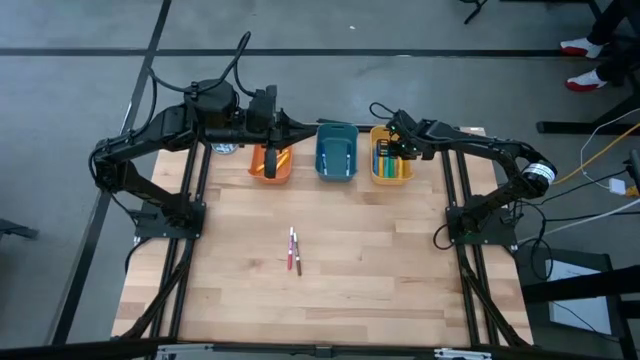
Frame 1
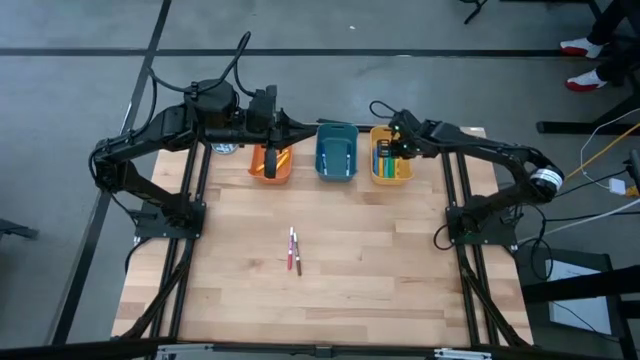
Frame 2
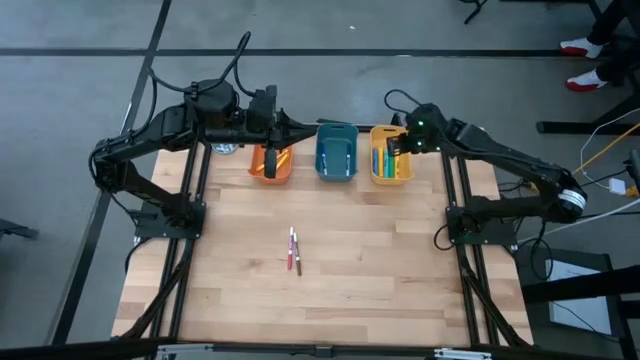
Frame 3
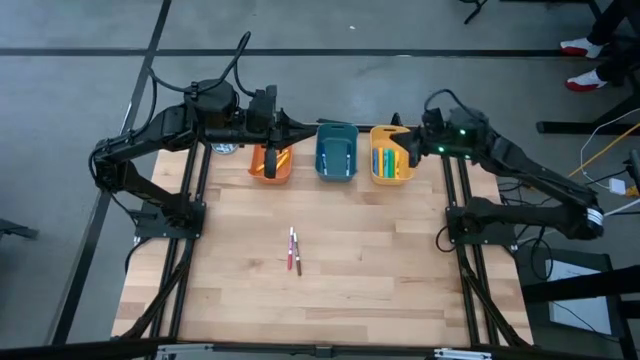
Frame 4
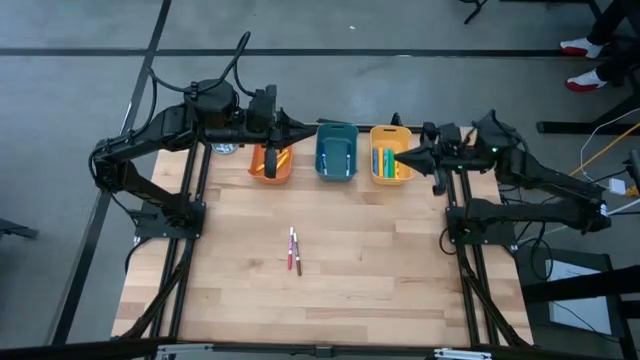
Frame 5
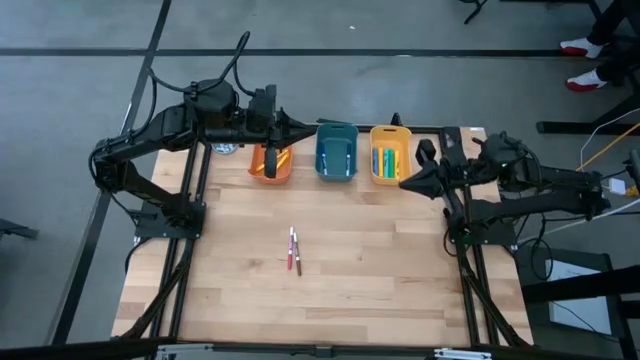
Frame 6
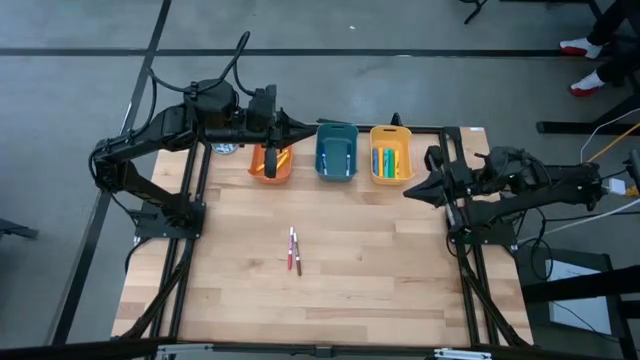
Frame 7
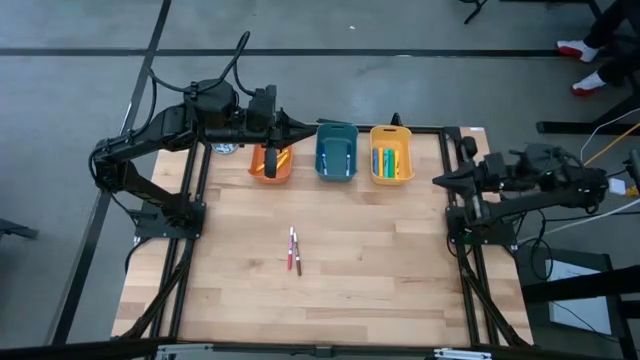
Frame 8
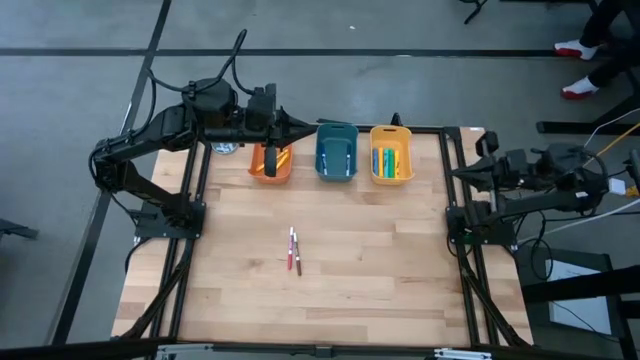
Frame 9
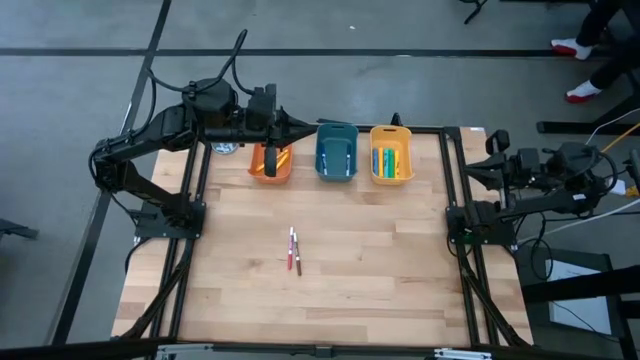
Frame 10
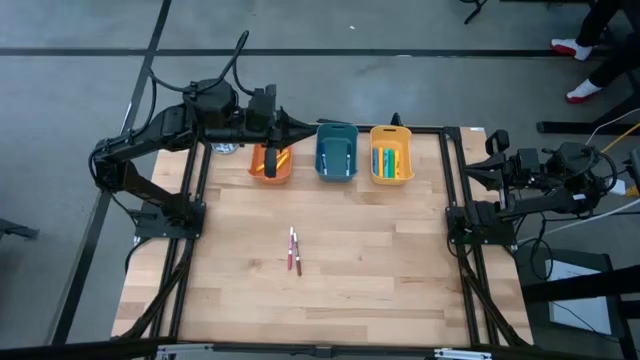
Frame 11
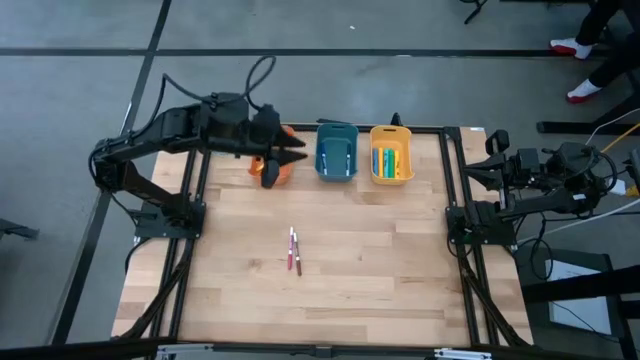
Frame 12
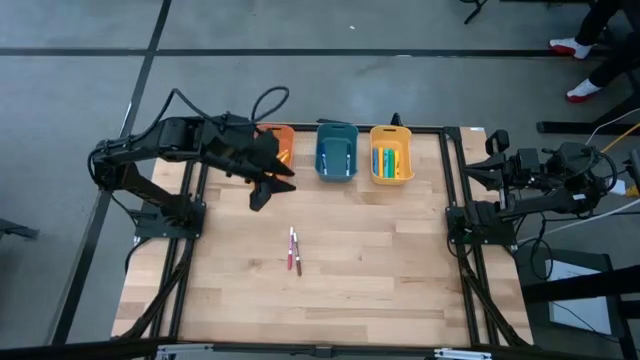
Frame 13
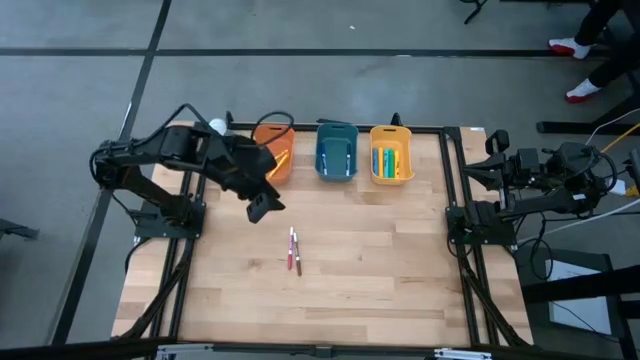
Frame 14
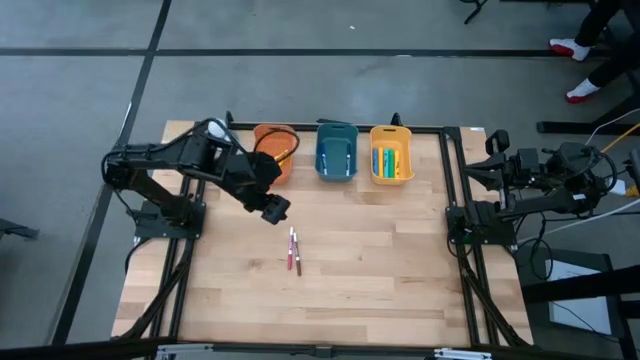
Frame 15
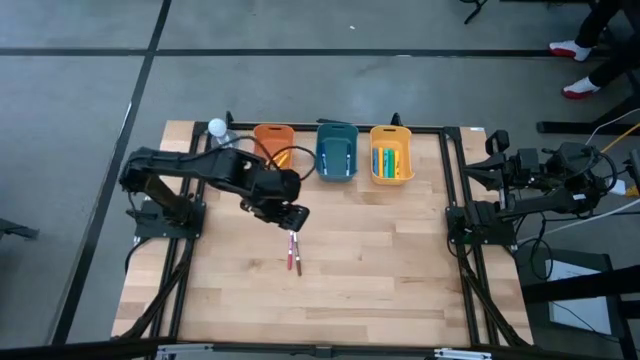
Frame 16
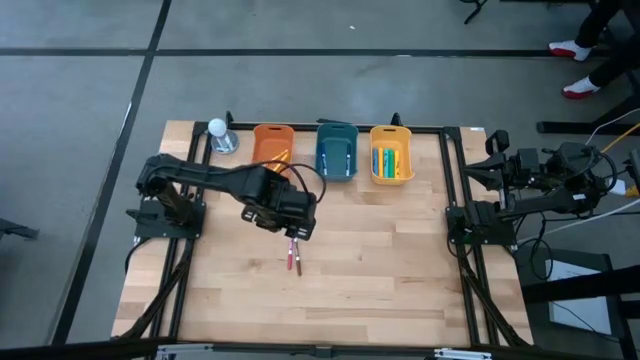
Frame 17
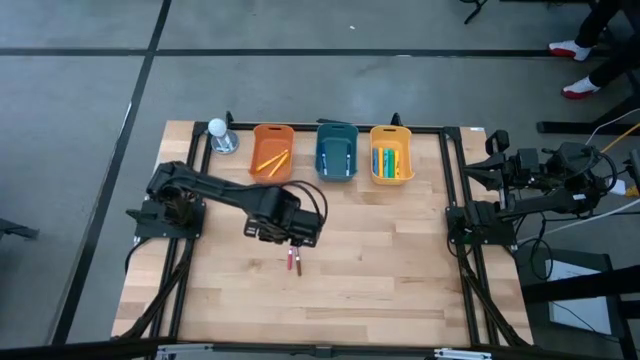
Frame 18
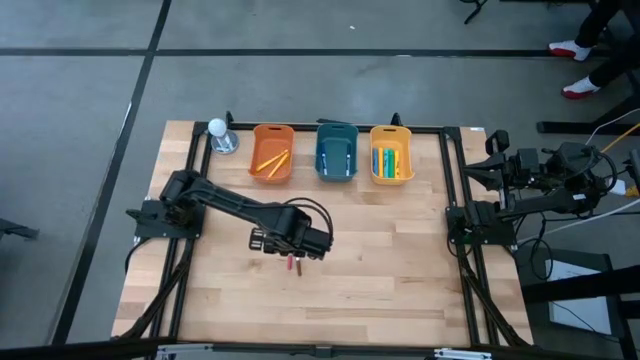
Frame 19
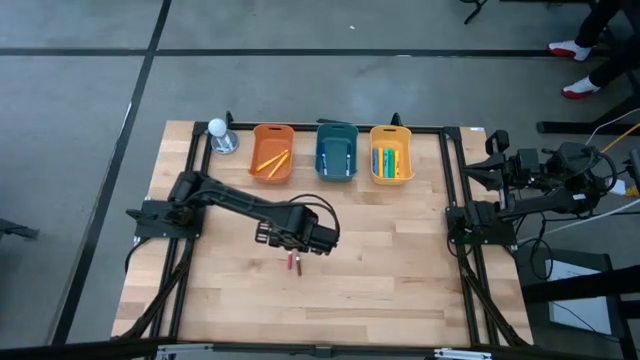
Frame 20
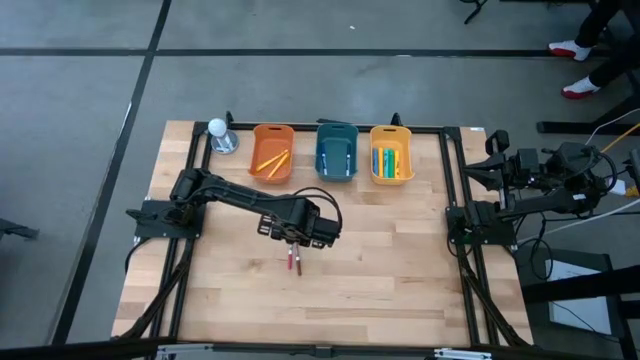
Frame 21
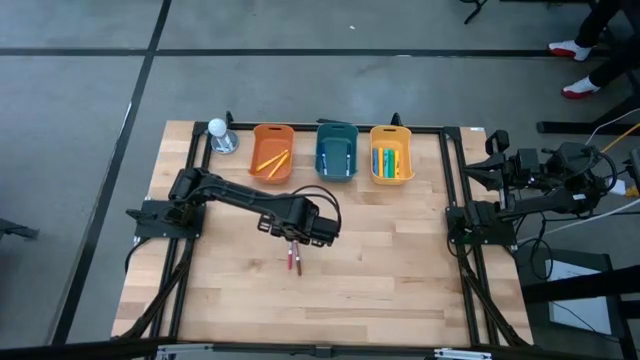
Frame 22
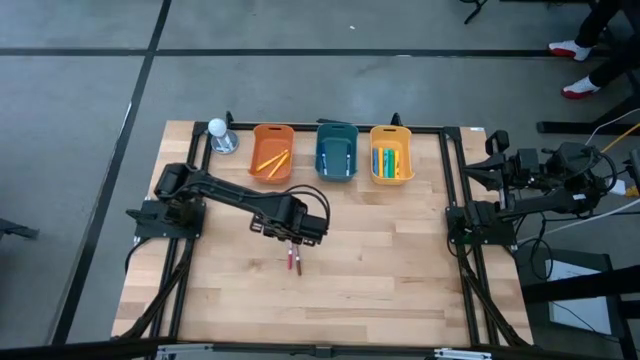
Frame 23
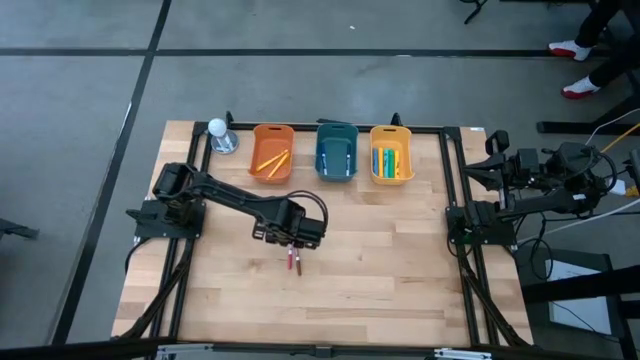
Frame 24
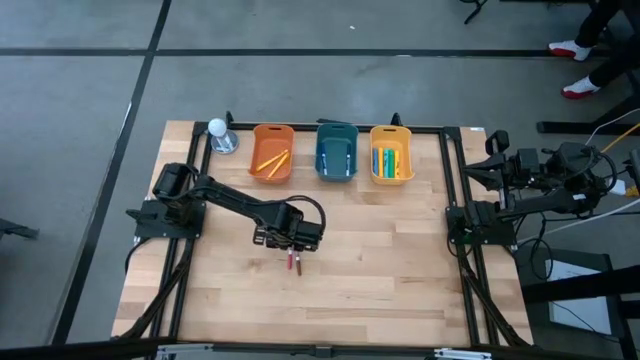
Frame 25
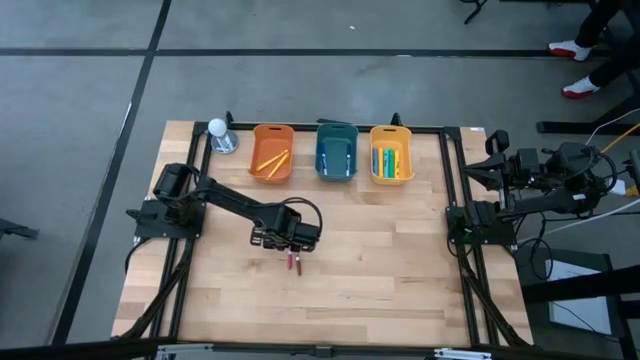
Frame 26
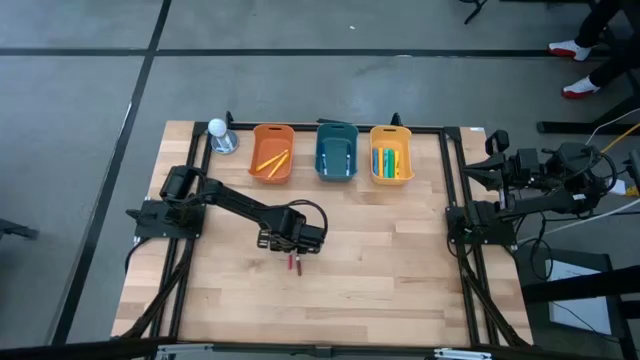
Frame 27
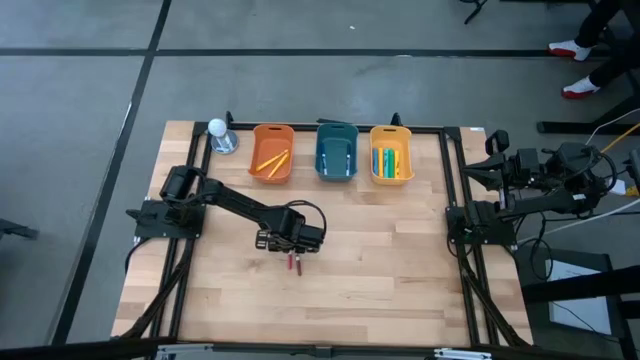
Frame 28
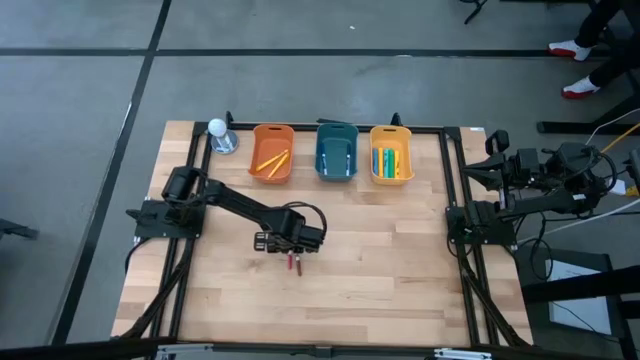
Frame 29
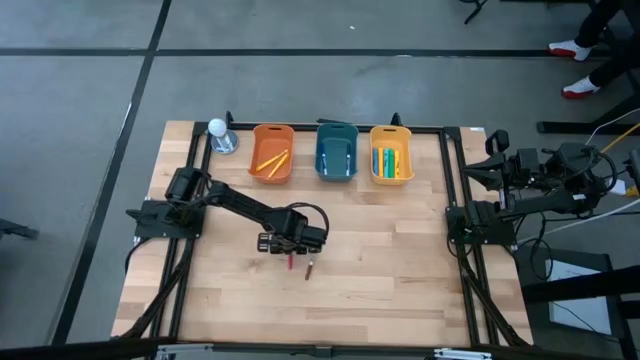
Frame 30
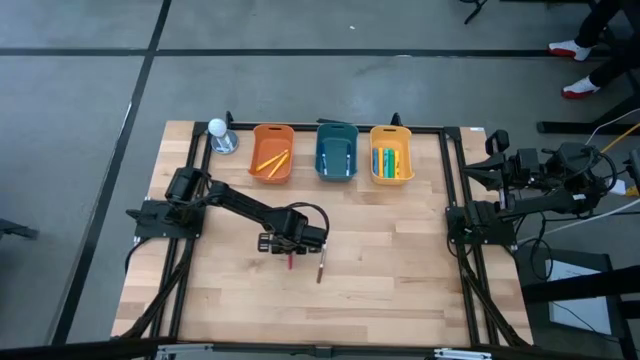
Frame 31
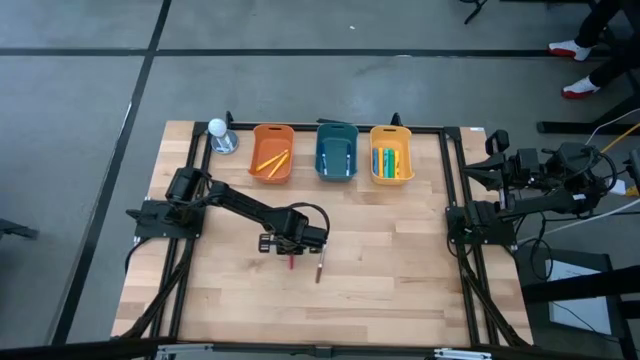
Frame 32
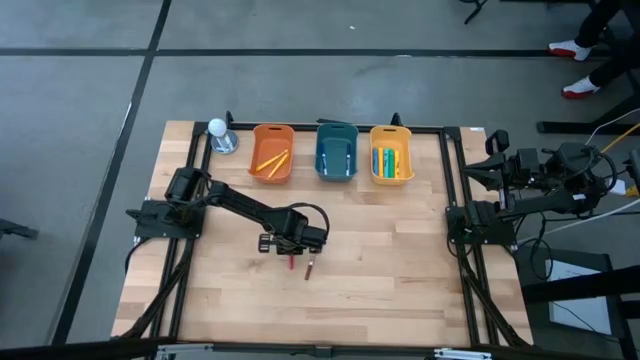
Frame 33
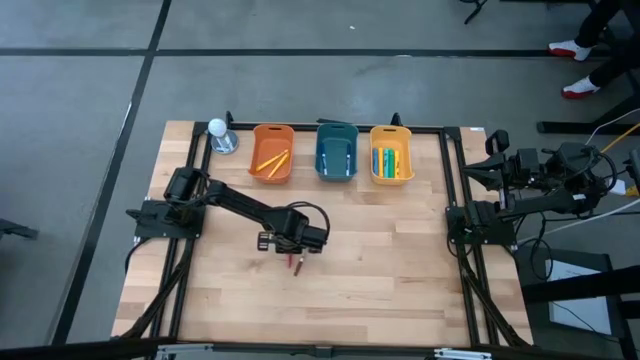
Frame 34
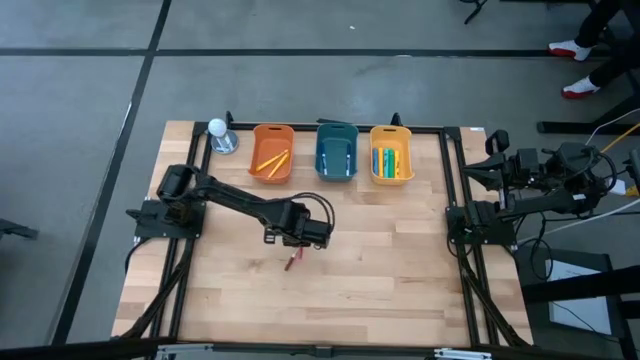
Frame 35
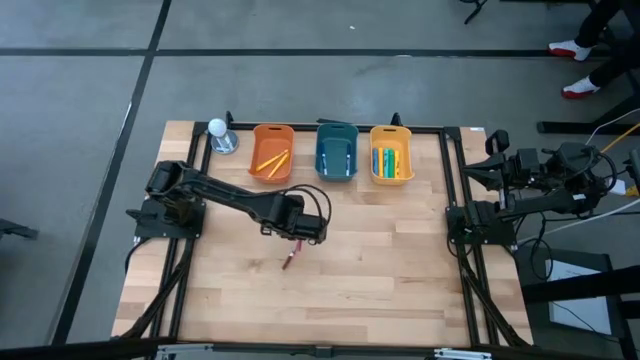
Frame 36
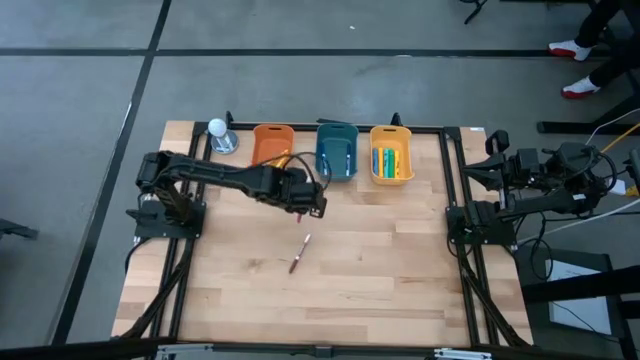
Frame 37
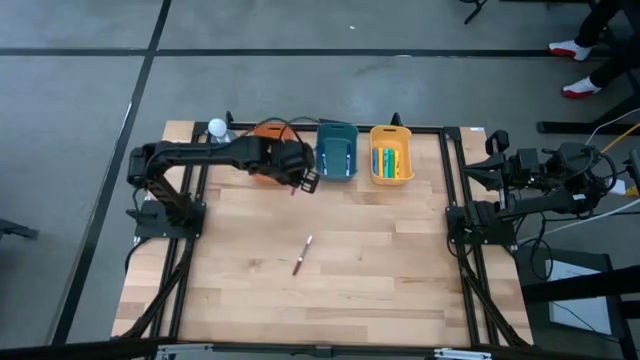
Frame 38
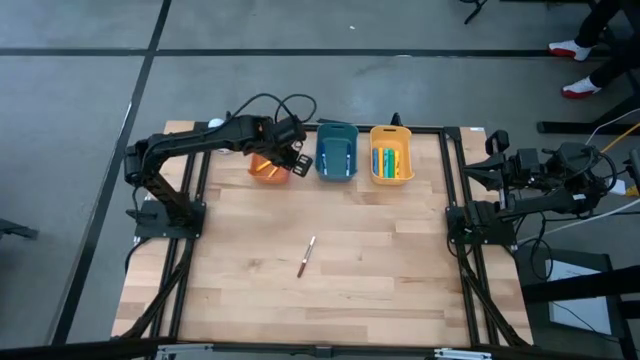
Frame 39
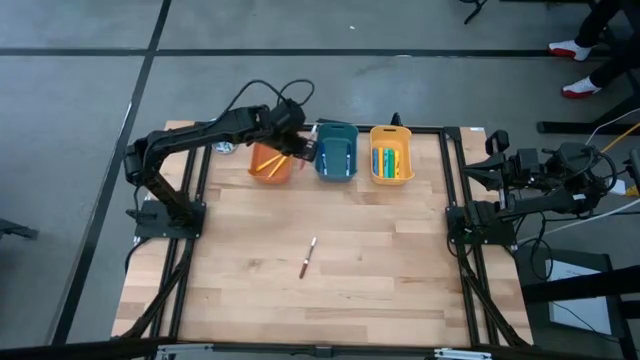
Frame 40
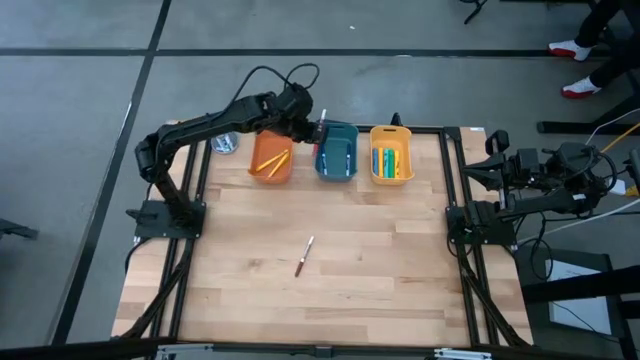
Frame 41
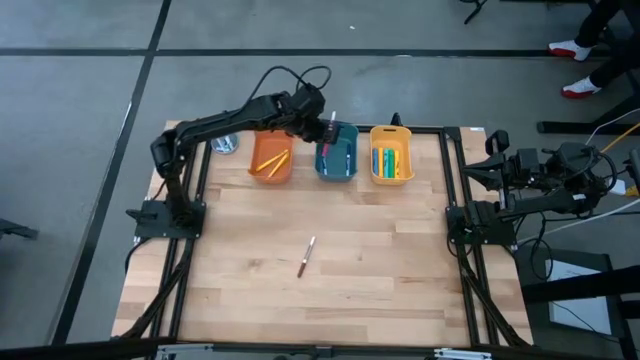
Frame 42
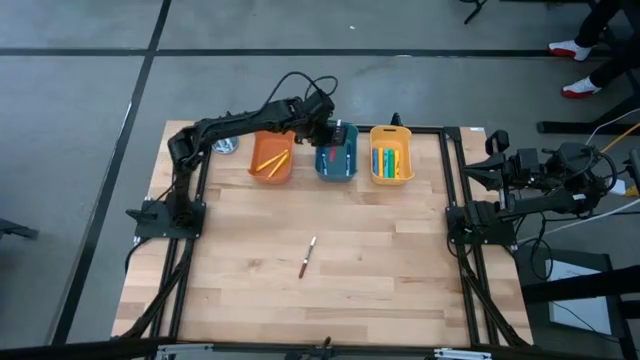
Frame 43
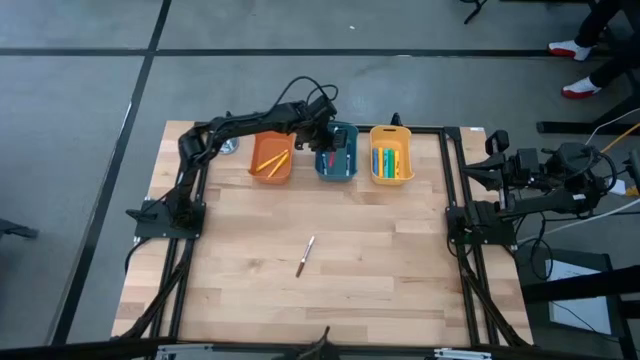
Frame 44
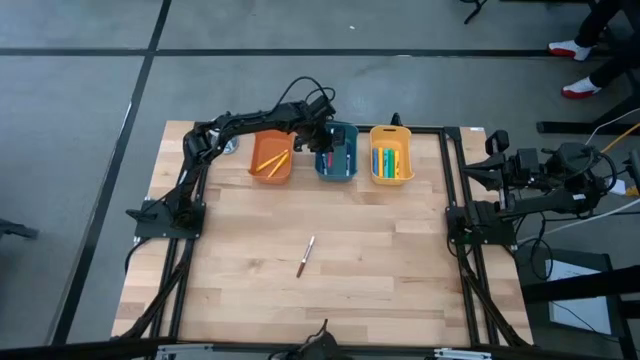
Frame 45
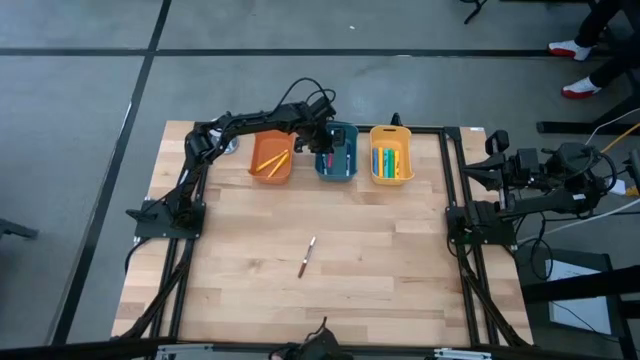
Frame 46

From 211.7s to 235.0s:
Task: Pick & Place Markers
Put the pink marker pen into the blue bin
